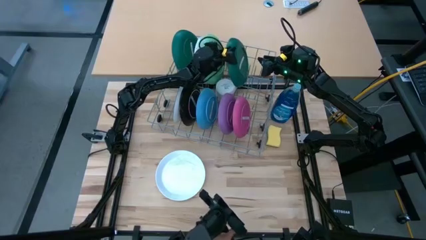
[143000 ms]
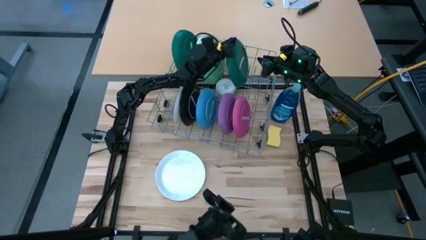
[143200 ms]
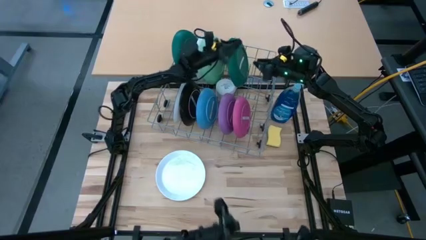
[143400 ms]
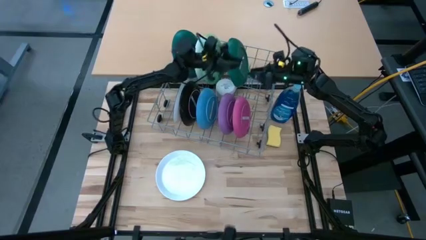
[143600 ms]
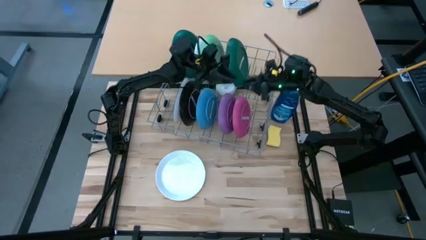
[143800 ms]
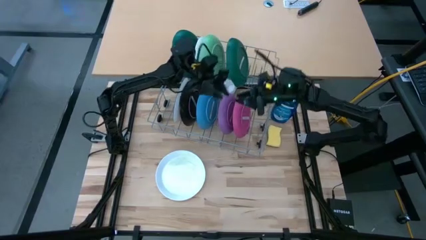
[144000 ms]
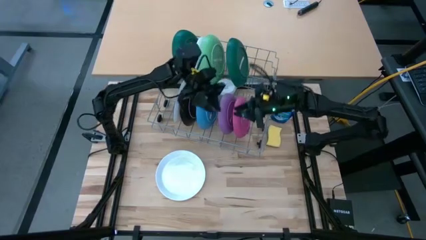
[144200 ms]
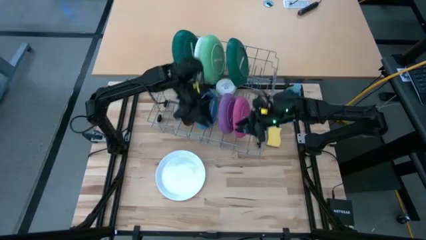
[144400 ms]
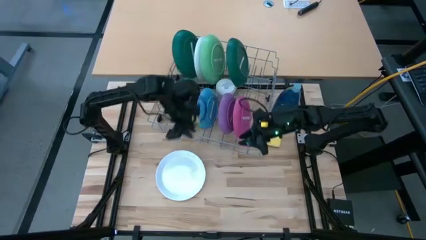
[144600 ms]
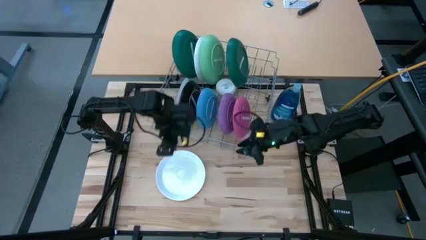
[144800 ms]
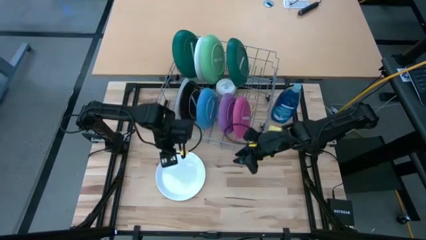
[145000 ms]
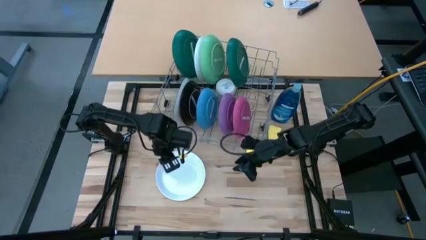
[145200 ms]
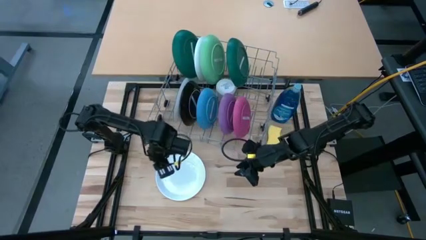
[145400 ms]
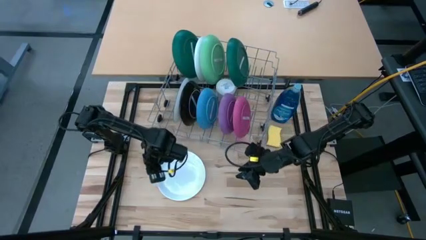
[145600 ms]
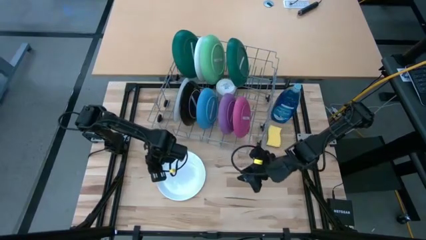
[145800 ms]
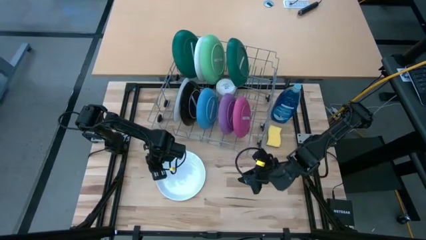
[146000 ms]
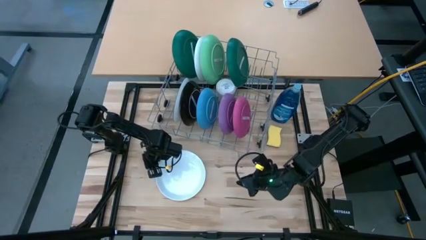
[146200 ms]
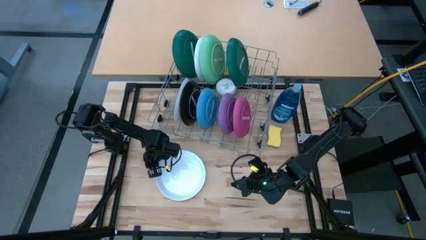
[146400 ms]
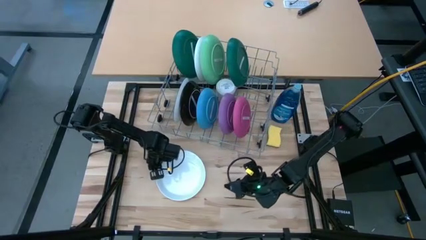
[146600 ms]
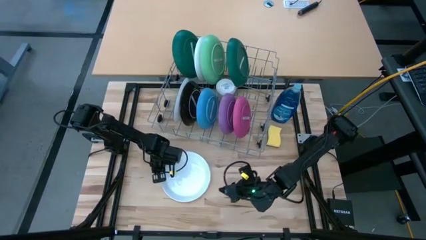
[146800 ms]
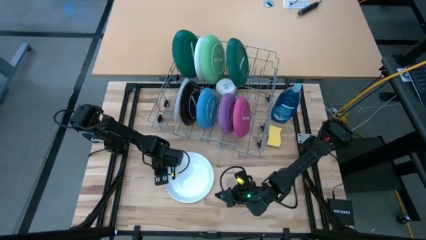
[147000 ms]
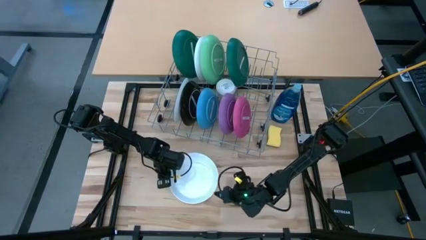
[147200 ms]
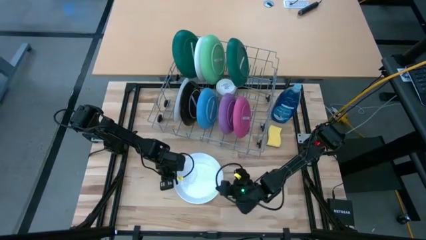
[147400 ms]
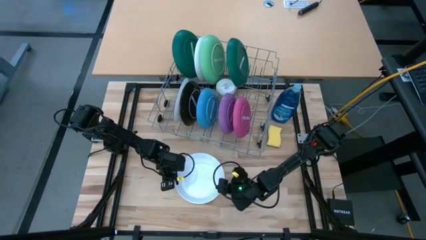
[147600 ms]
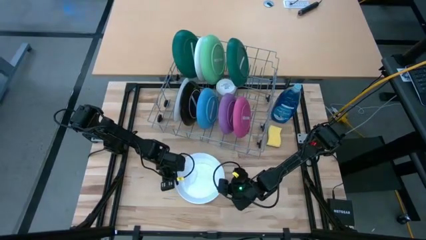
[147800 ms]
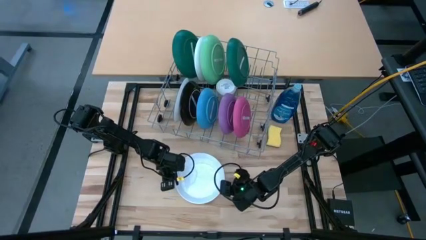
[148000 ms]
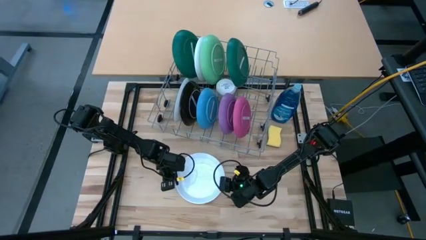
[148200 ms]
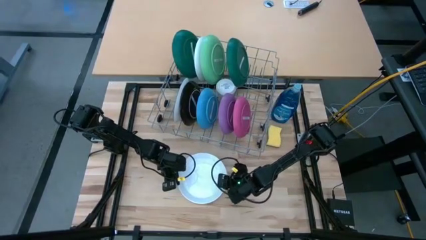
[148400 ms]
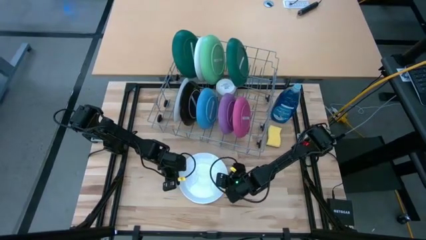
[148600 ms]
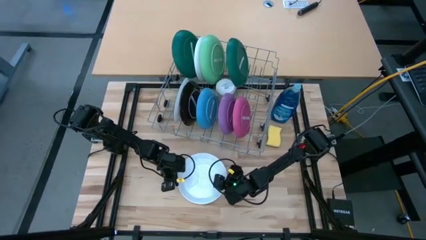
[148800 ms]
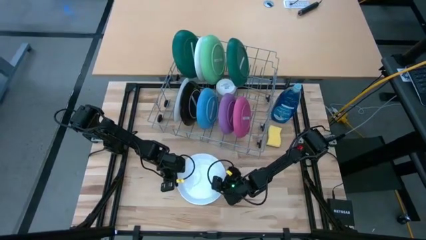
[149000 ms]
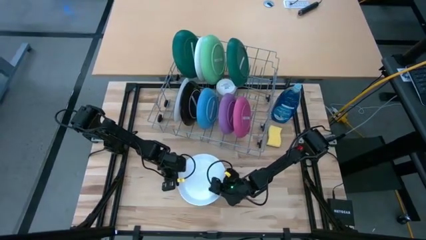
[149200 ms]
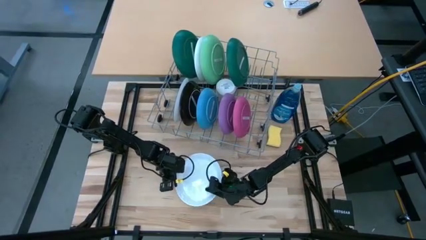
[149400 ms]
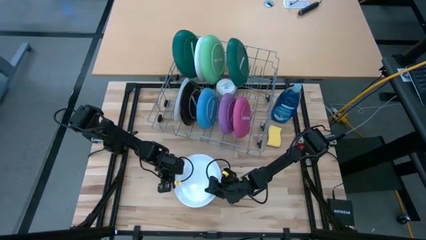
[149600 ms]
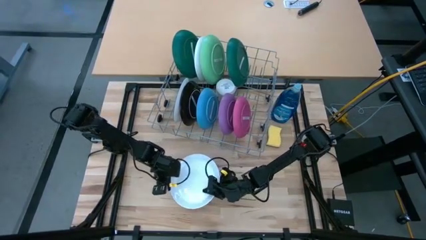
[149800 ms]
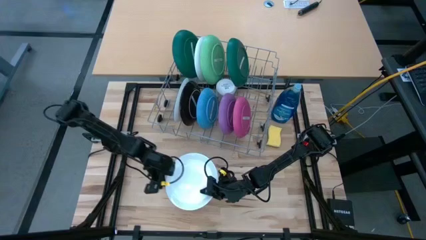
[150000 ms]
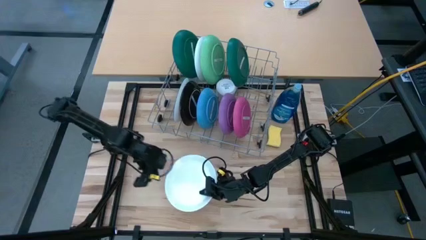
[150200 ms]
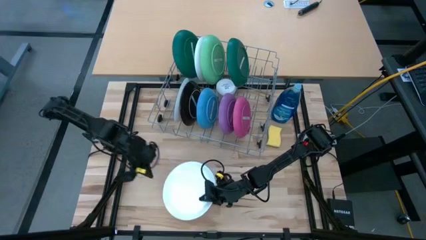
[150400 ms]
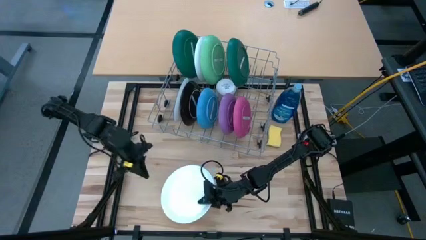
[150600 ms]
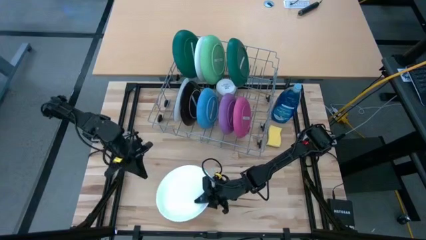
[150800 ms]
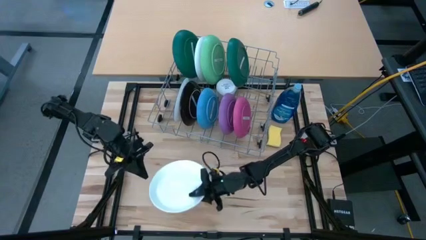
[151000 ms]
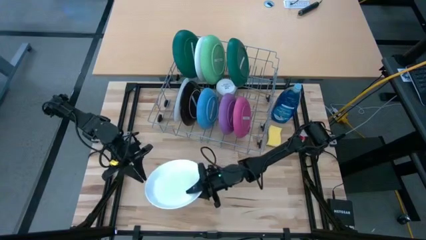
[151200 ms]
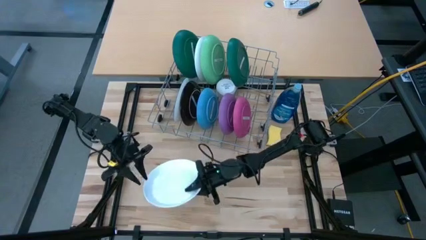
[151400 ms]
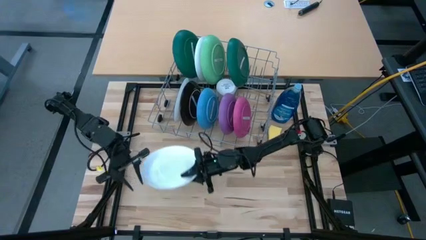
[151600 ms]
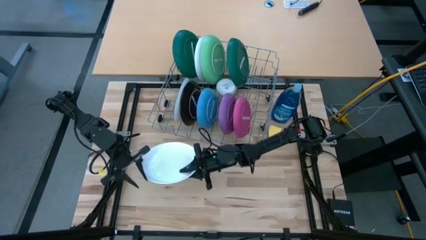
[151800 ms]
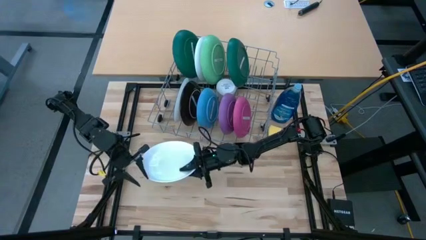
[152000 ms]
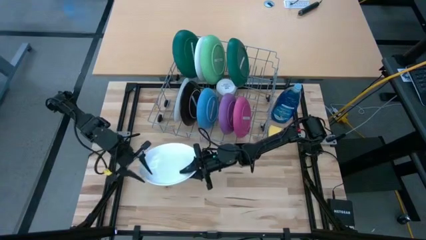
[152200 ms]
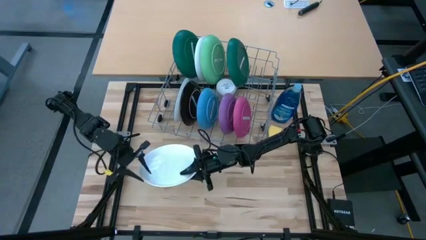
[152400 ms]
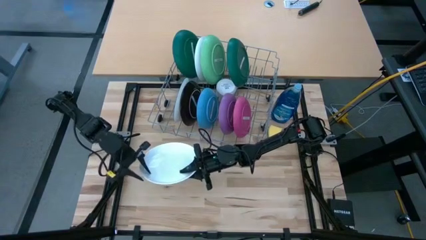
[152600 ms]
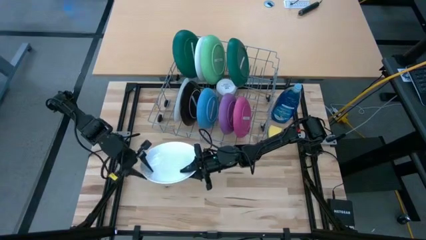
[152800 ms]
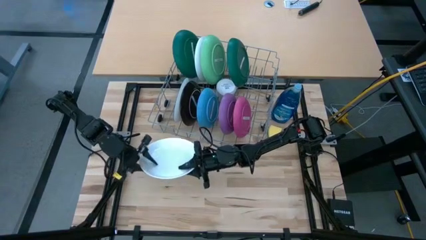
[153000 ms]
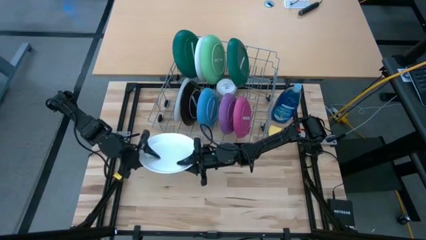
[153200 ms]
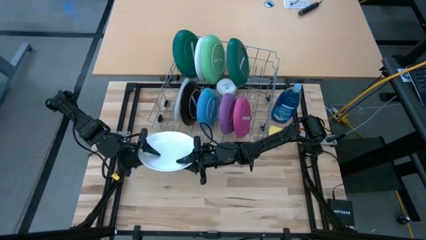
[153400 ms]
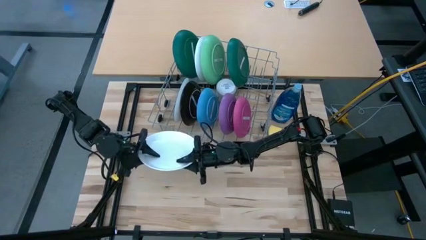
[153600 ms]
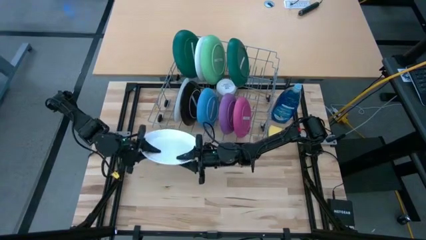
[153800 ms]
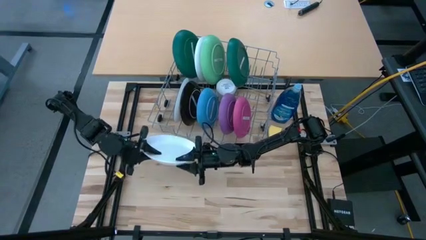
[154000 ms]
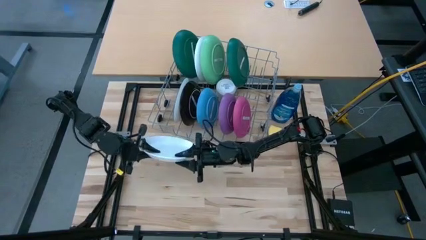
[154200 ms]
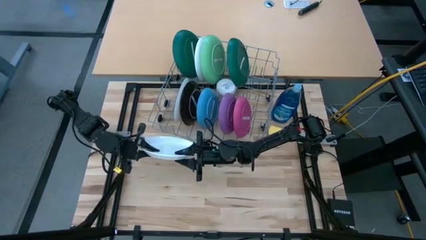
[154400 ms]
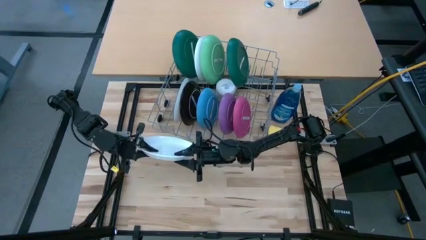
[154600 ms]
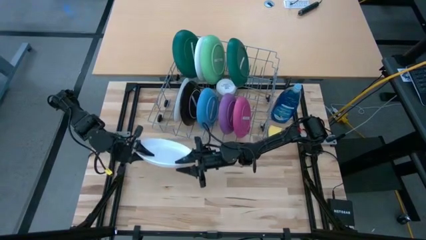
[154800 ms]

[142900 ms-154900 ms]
Task: Sort dishes
Put the white plate in the dish rack

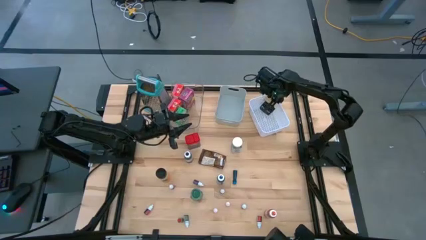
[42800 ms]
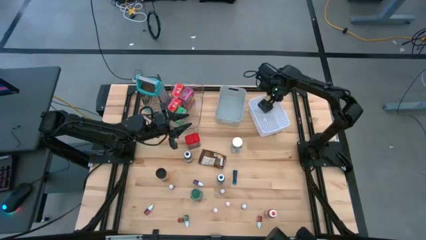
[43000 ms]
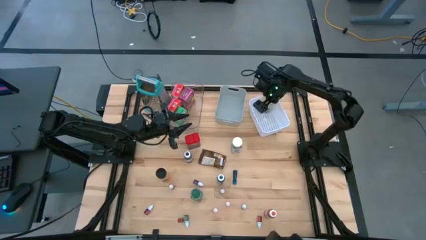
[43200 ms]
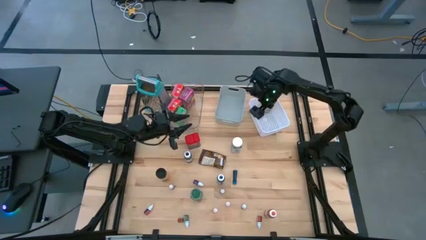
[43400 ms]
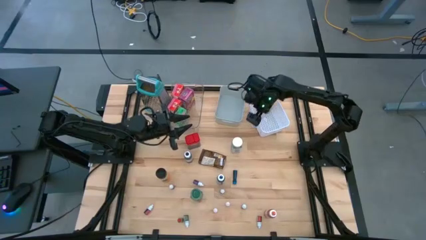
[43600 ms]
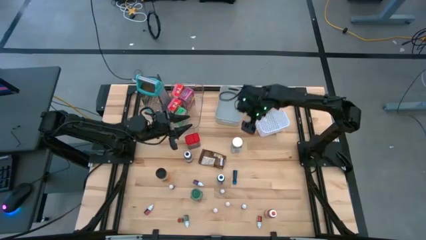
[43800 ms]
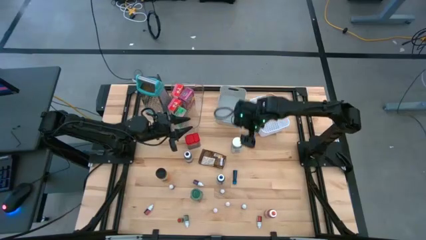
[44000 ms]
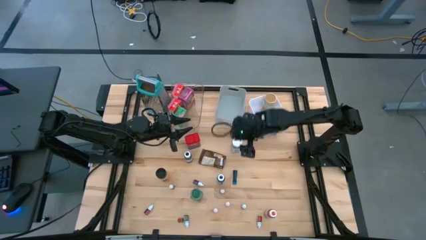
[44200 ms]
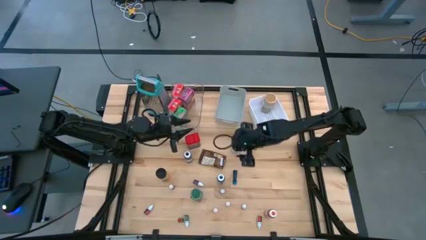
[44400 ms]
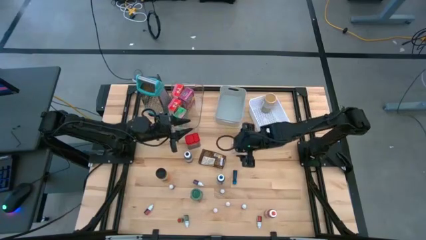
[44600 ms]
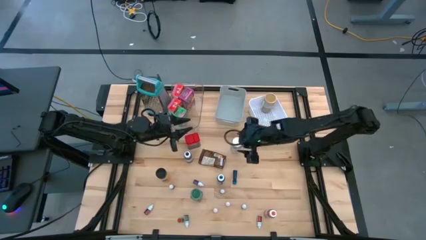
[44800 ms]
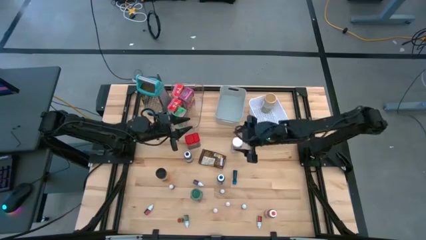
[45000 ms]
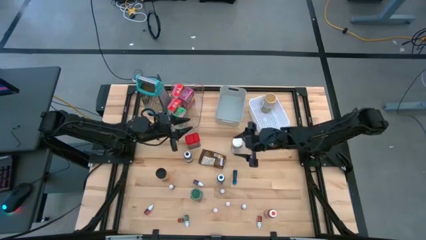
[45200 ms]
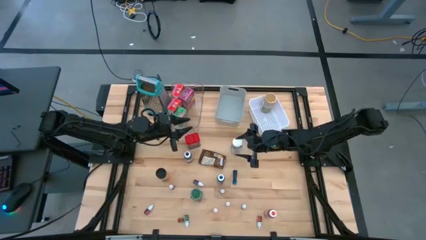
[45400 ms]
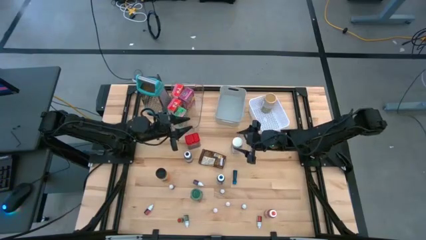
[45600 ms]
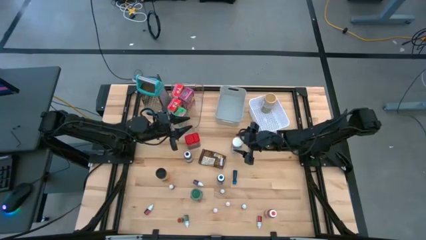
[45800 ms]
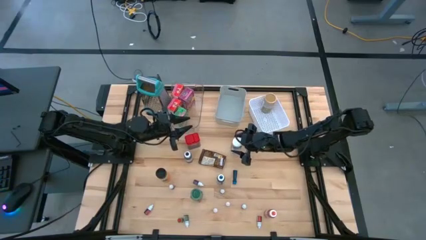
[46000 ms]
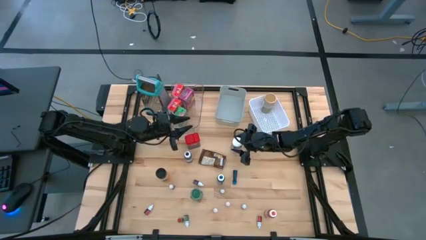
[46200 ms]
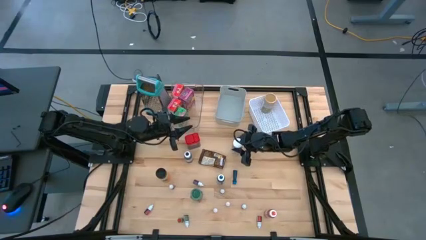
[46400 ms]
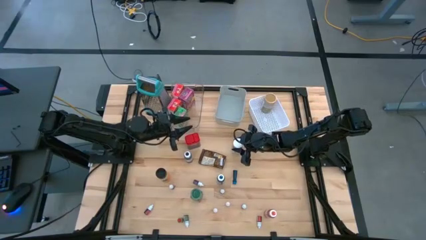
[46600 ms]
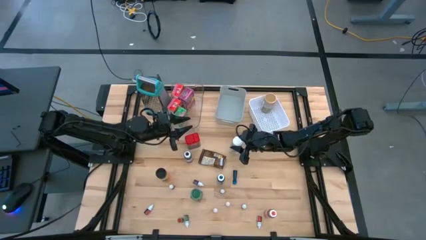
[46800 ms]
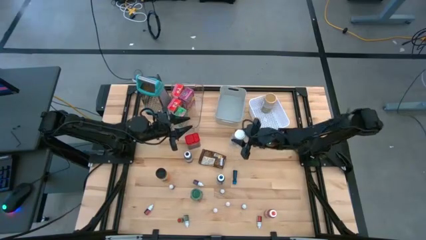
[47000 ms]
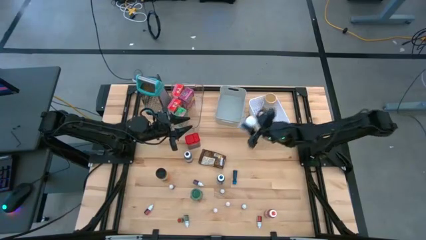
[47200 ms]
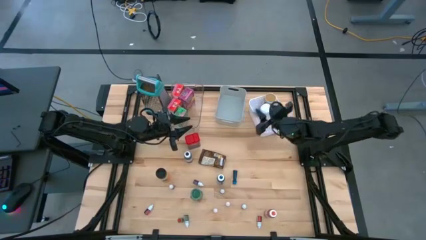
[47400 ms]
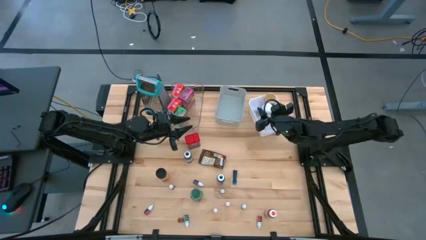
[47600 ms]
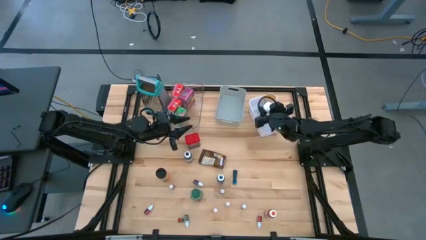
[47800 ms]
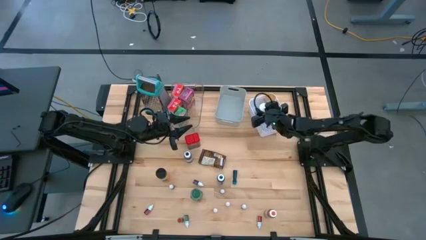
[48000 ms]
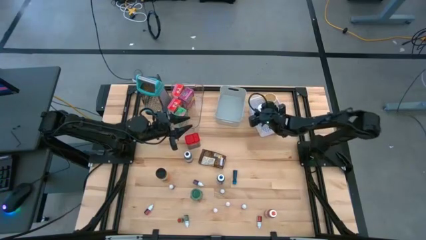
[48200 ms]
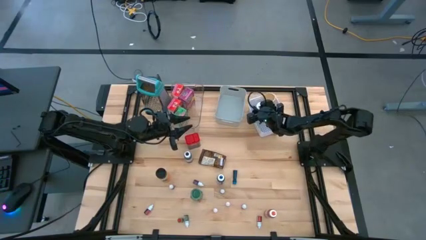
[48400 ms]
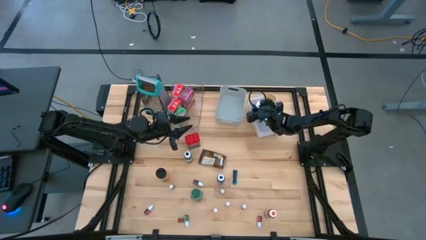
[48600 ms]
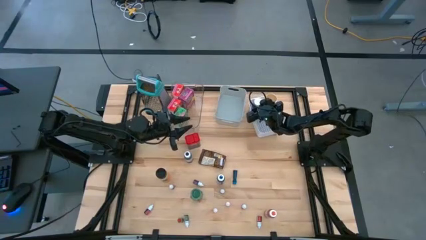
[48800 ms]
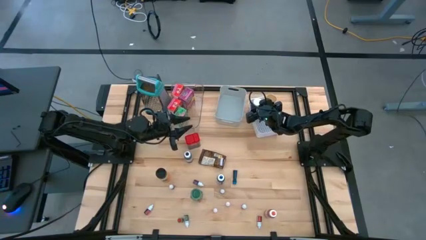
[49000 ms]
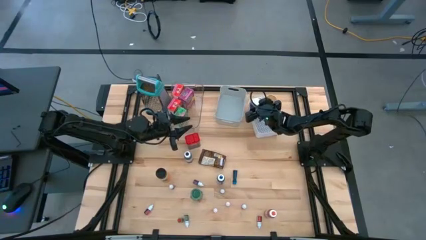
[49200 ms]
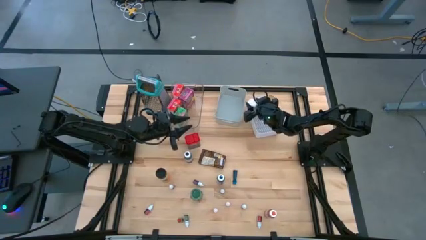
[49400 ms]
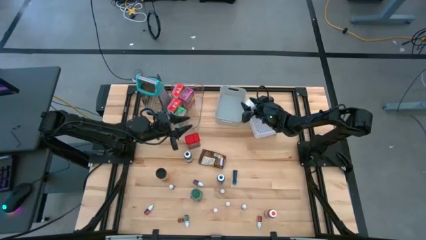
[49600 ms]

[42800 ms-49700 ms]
Task: Pick & Place Kitchen Items
Put the white spice bottle into the white bin
